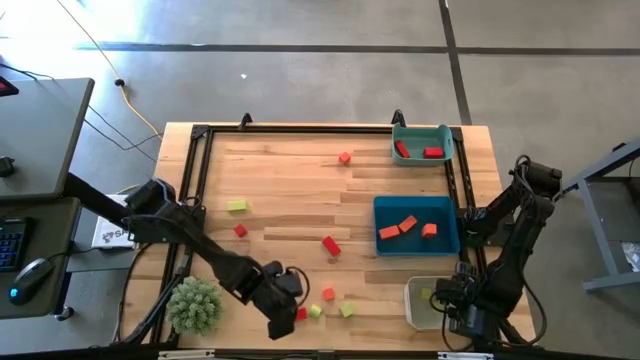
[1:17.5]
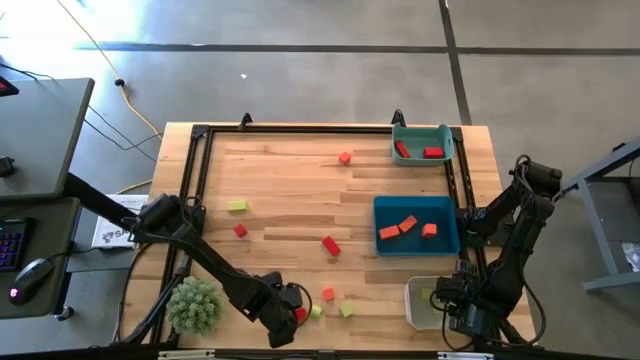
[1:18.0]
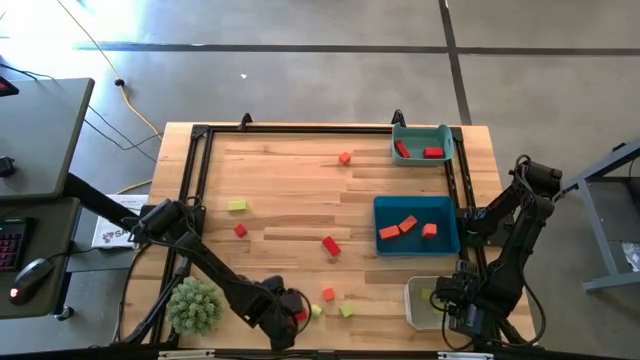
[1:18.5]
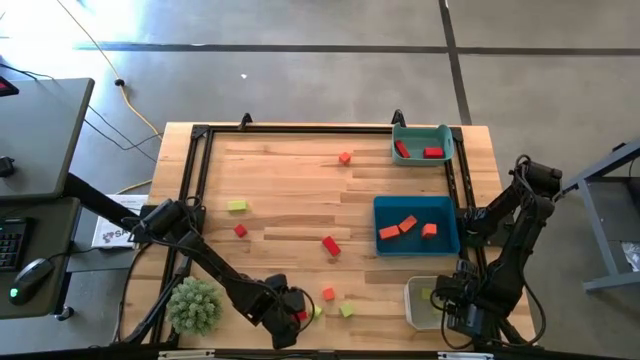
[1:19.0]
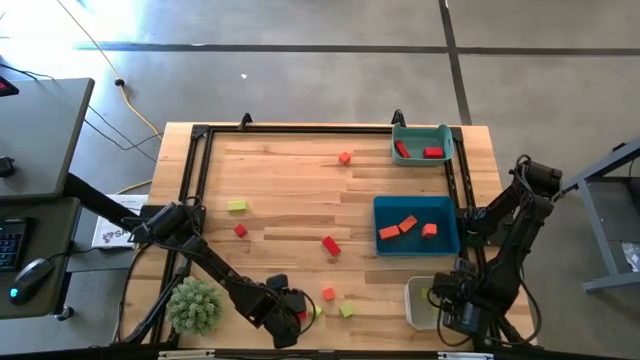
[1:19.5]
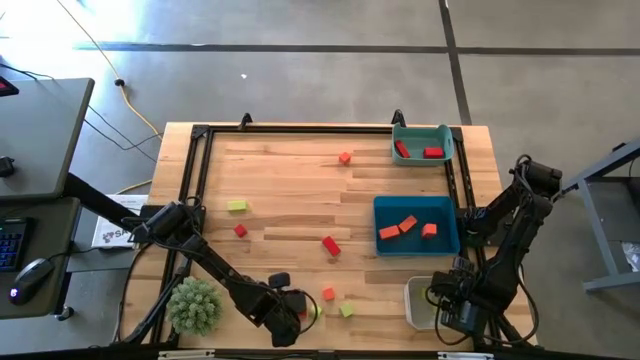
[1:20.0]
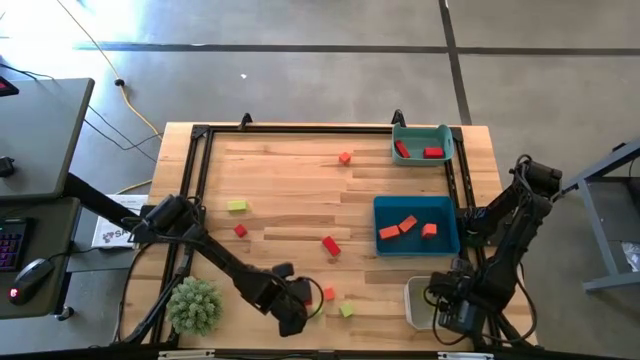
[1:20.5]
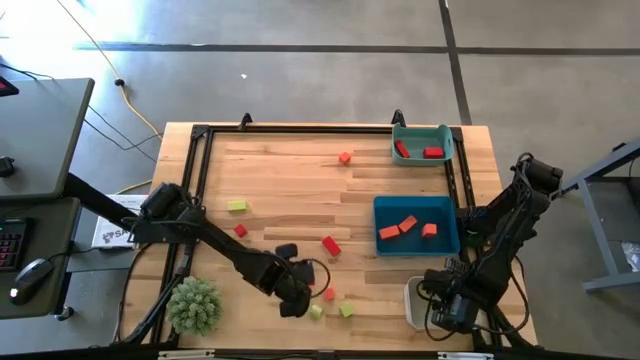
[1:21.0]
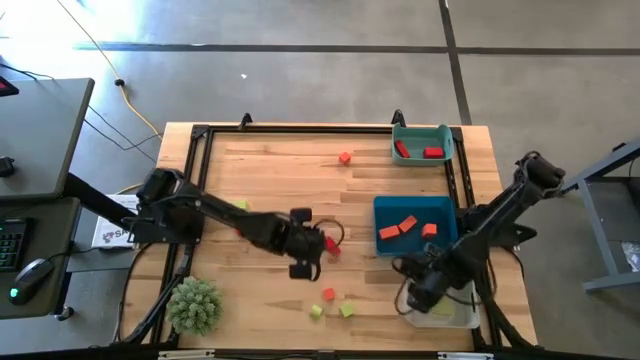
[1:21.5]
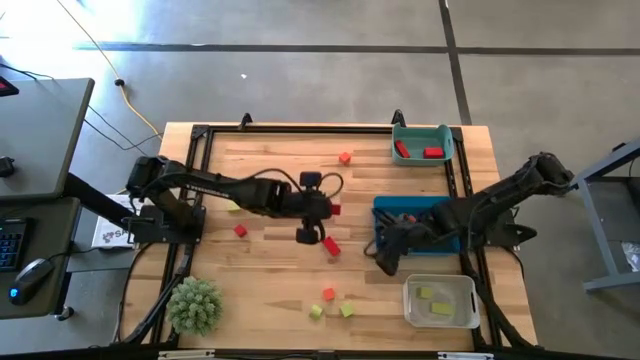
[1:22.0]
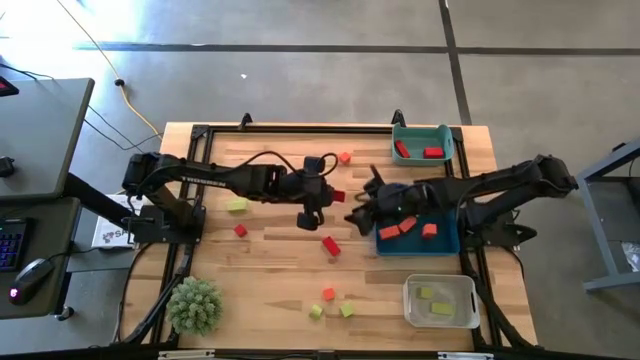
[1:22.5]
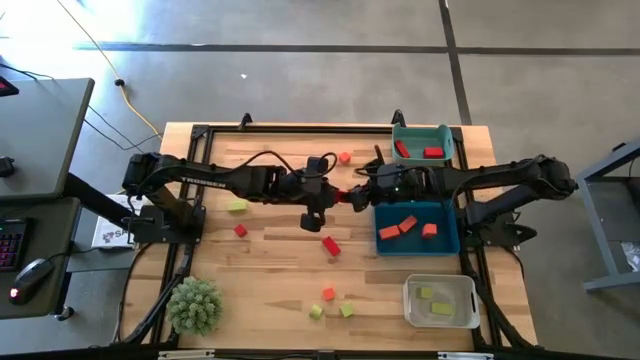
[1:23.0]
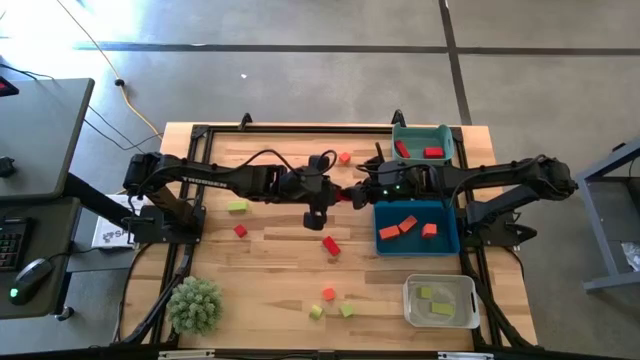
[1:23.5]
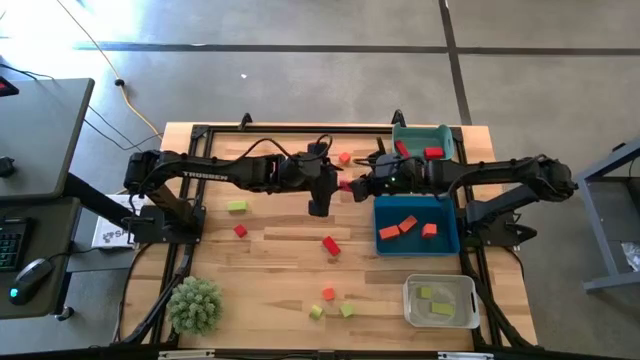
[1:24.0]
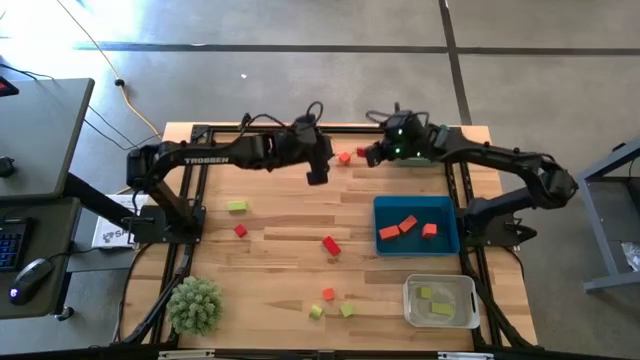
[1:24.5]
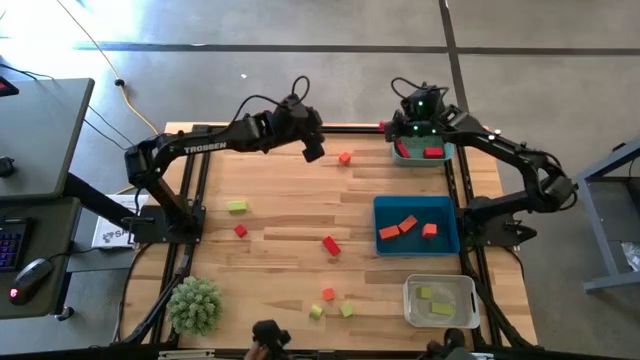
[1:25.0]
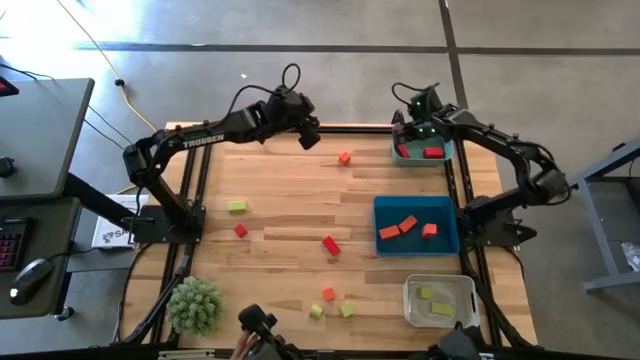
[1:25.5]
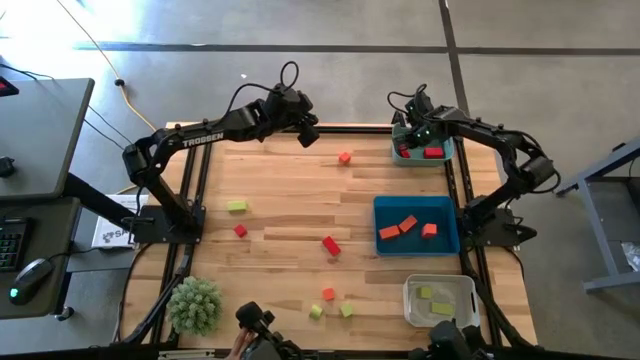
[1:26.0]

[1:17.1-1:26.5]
Task: Sort & place blocks by color
Put the red wooden block into the green bin

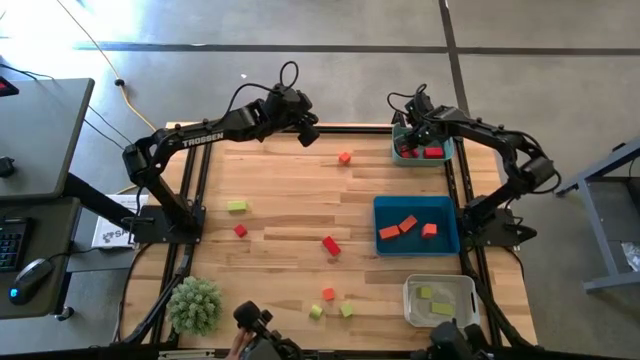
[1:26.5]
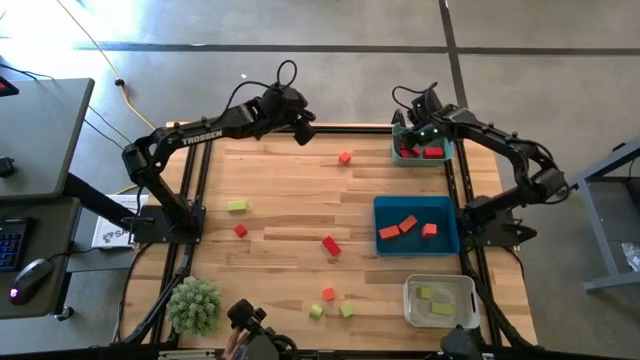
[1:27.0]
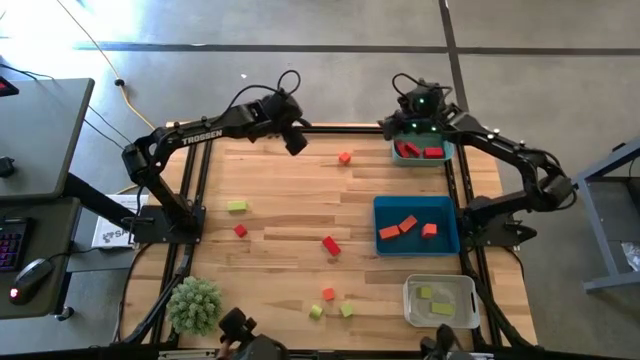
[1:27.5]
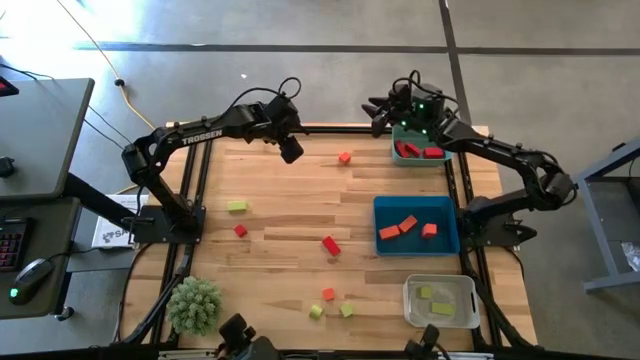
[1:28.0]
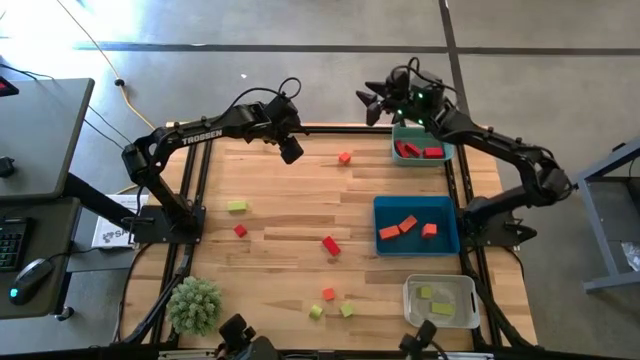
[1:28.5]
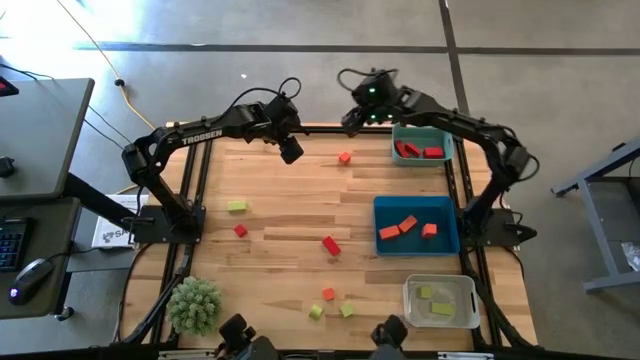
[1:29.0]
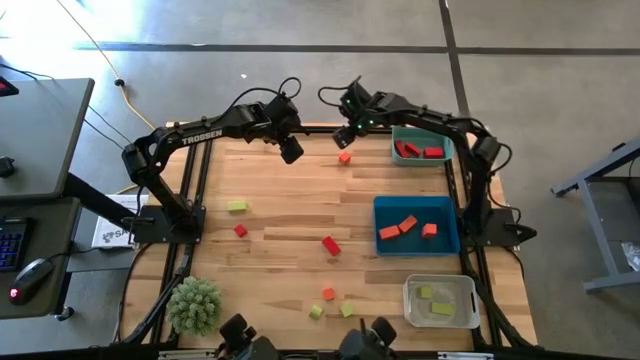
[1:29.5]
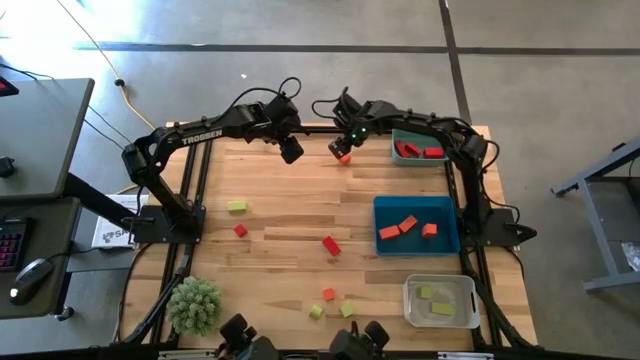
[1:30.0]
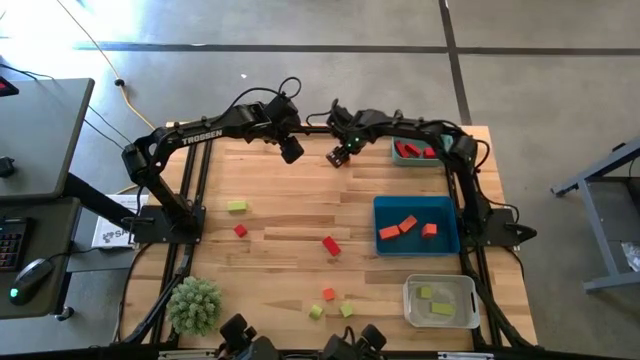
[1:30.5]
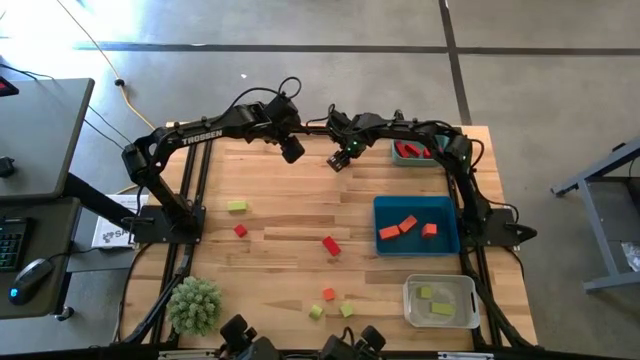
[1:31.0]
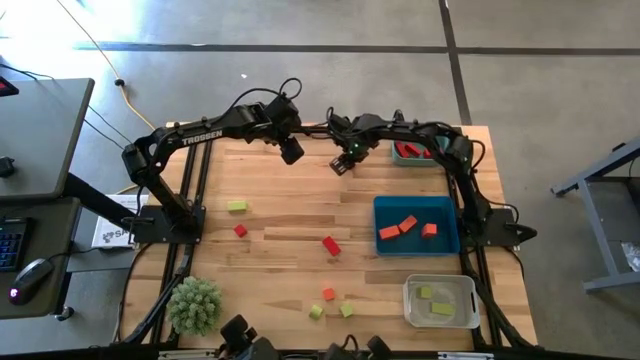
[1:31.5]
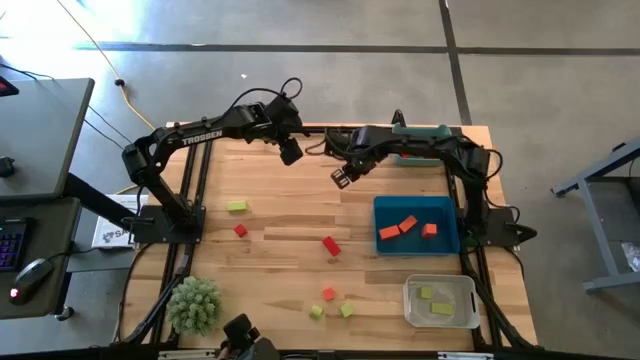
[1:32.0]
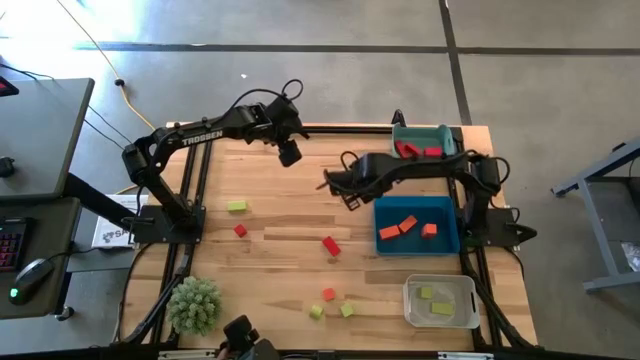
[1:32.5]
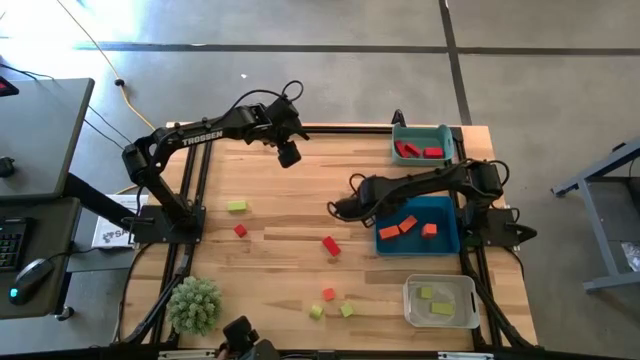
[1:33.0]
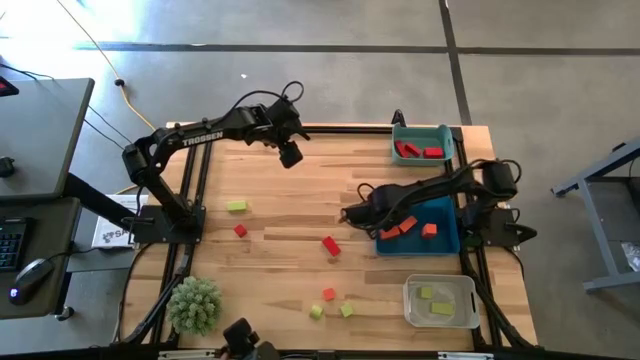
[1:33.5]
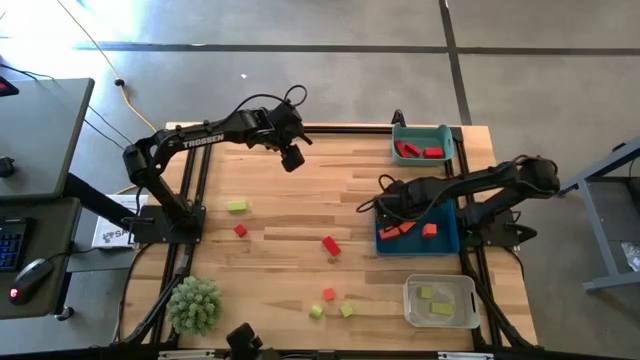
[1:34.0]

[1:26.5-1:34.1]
Put the orange wooden block into the blue bin
